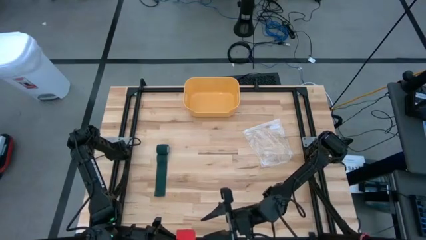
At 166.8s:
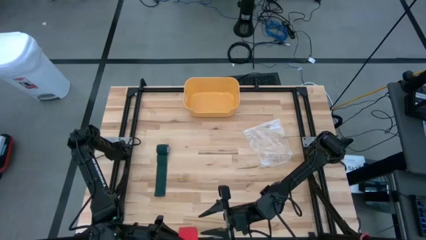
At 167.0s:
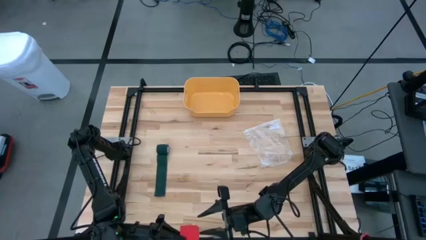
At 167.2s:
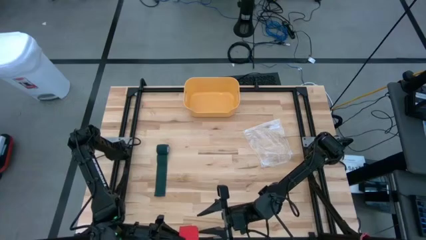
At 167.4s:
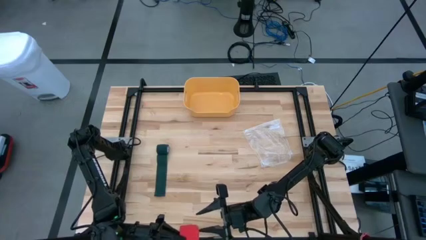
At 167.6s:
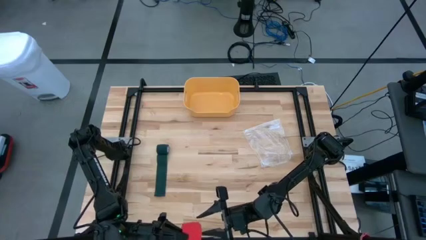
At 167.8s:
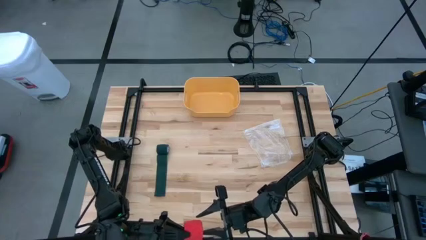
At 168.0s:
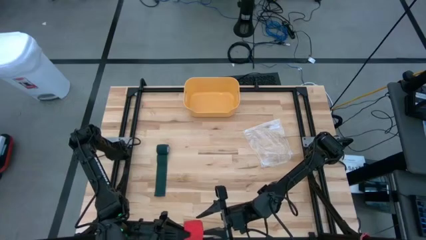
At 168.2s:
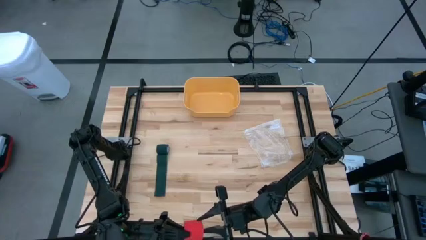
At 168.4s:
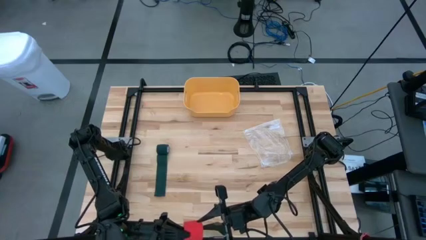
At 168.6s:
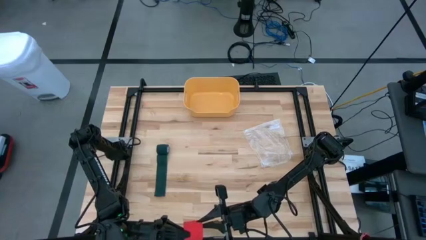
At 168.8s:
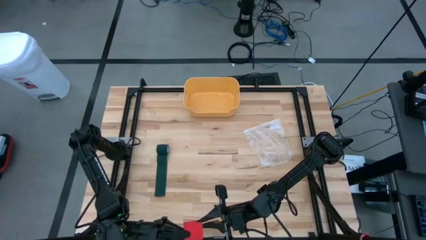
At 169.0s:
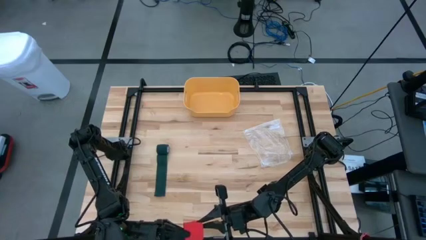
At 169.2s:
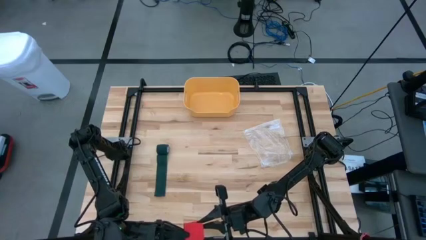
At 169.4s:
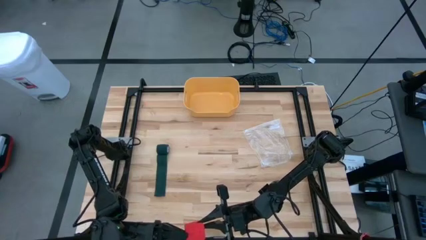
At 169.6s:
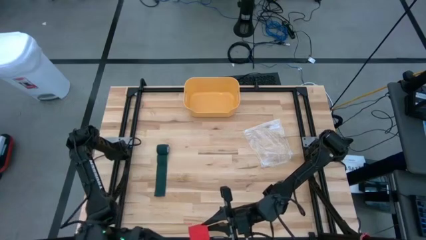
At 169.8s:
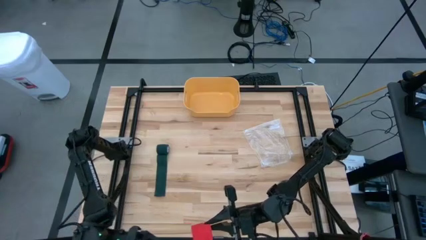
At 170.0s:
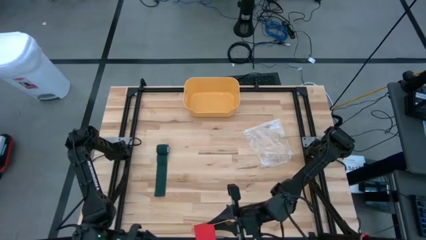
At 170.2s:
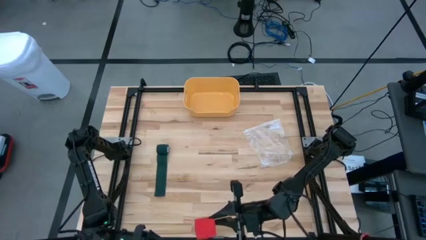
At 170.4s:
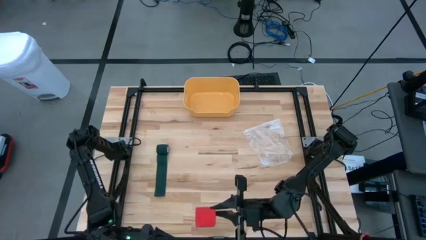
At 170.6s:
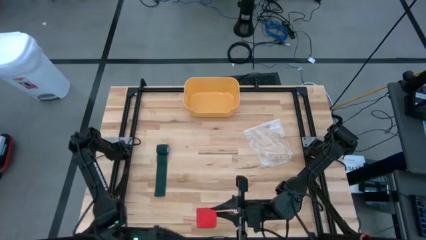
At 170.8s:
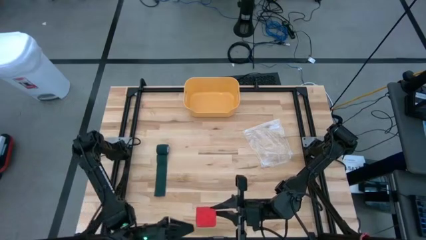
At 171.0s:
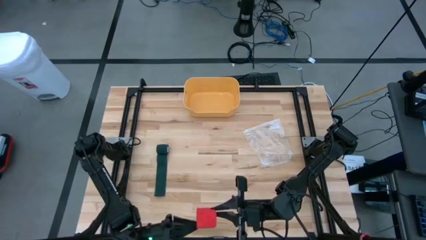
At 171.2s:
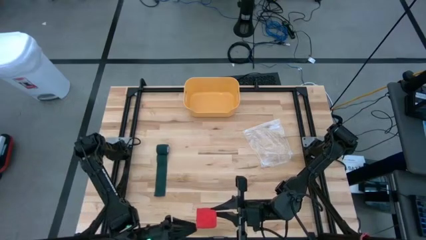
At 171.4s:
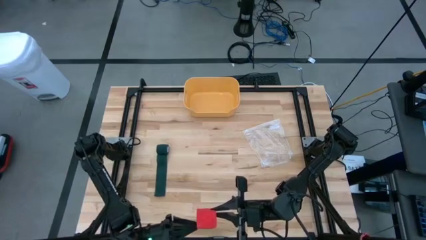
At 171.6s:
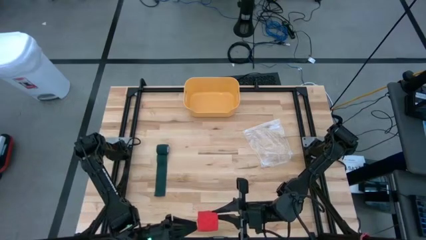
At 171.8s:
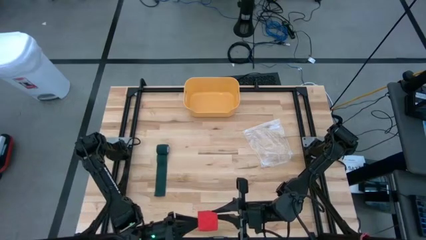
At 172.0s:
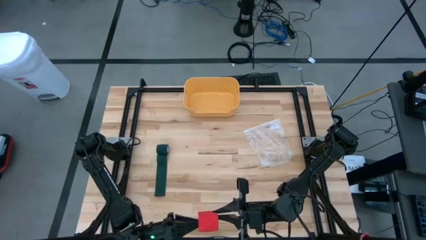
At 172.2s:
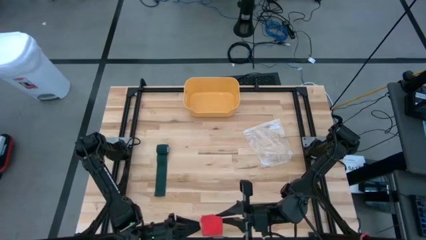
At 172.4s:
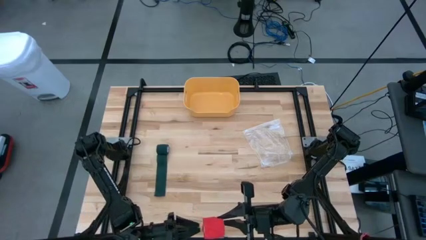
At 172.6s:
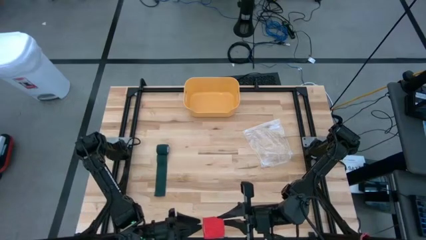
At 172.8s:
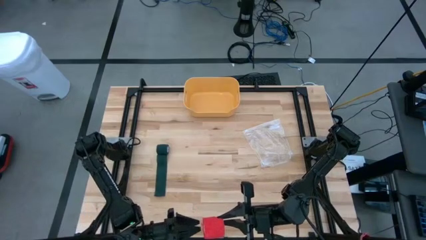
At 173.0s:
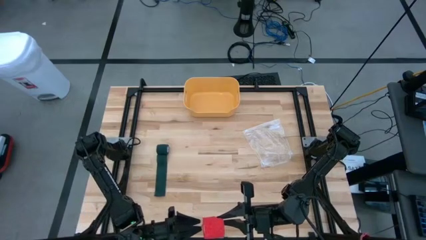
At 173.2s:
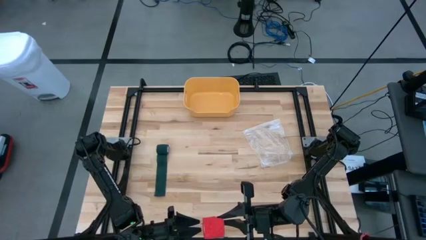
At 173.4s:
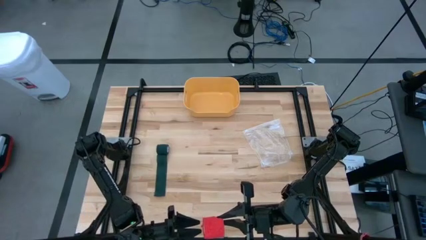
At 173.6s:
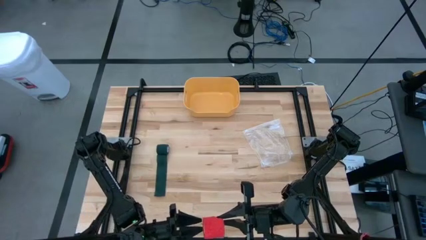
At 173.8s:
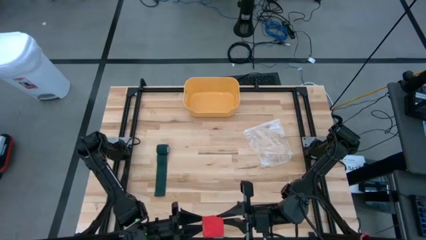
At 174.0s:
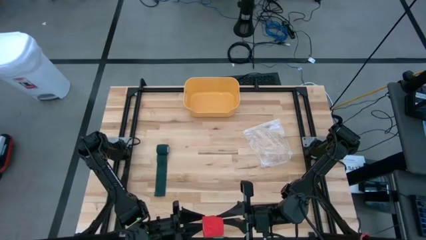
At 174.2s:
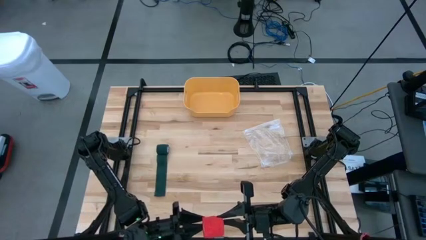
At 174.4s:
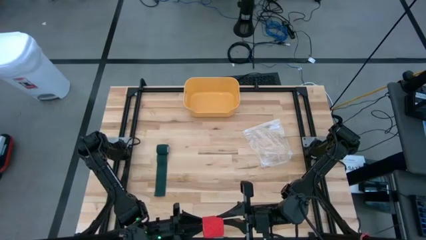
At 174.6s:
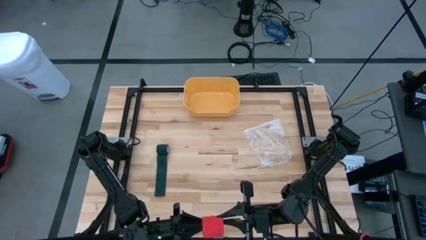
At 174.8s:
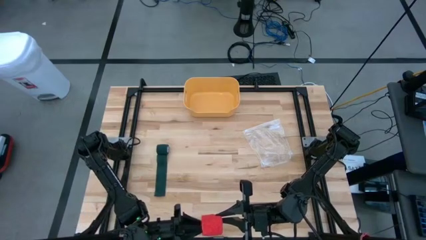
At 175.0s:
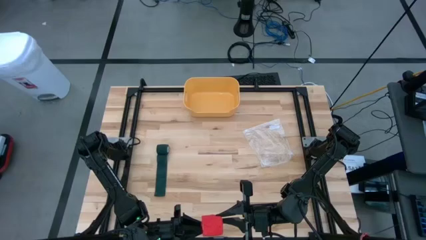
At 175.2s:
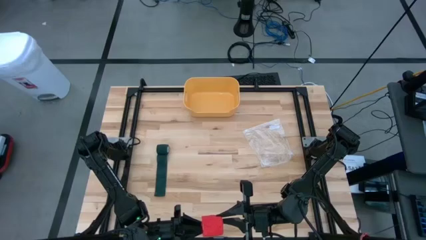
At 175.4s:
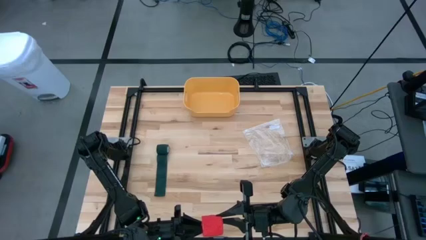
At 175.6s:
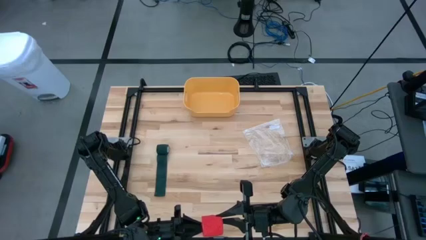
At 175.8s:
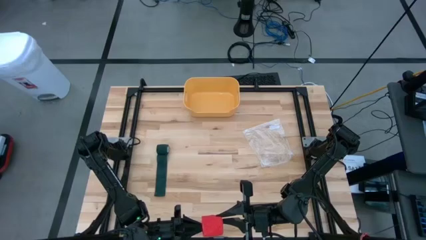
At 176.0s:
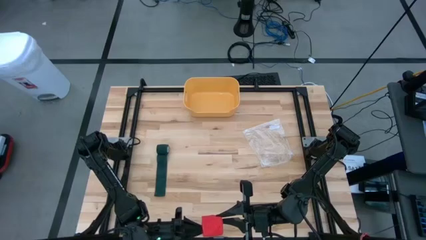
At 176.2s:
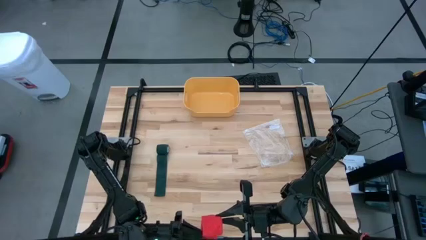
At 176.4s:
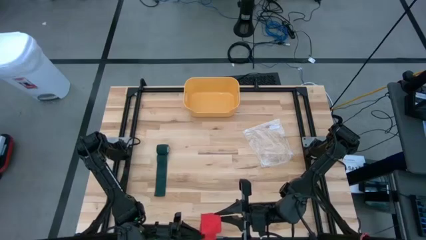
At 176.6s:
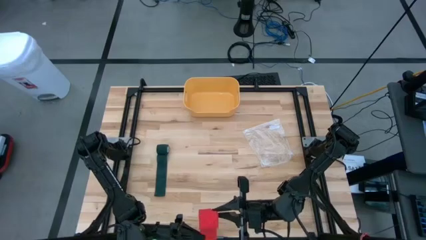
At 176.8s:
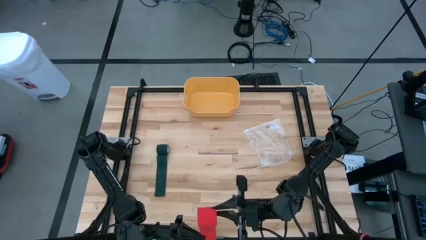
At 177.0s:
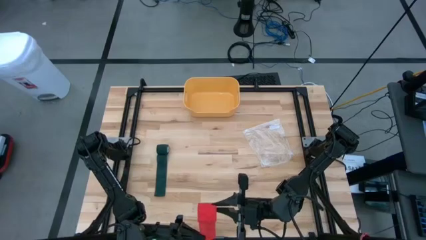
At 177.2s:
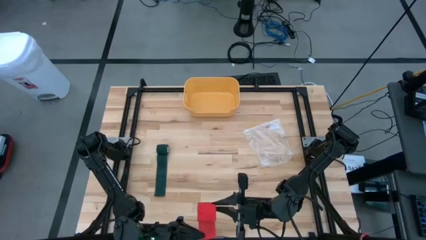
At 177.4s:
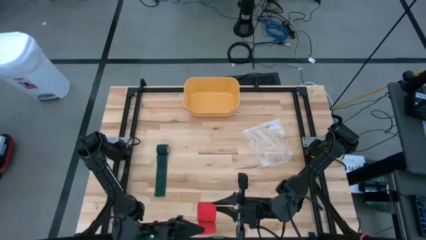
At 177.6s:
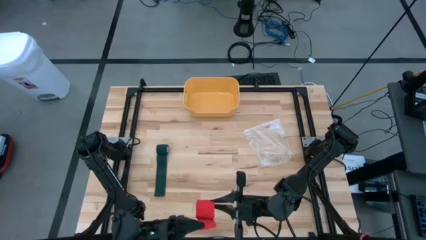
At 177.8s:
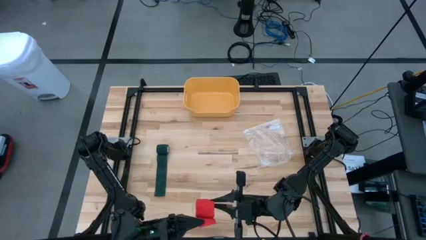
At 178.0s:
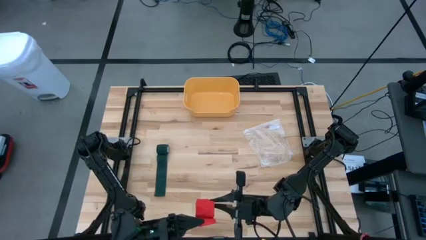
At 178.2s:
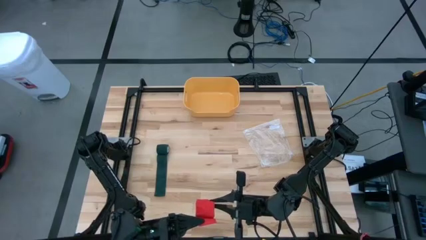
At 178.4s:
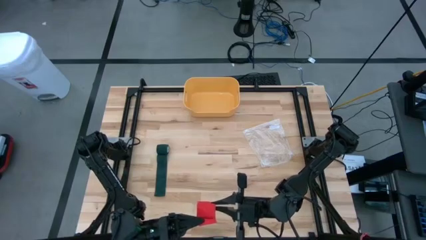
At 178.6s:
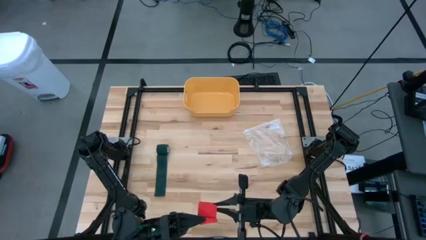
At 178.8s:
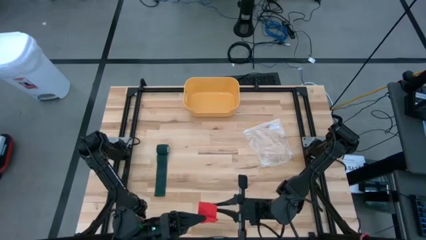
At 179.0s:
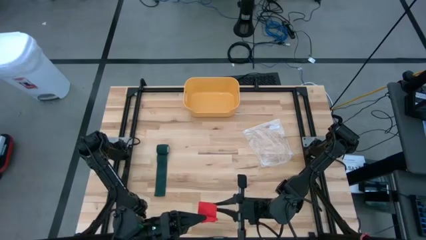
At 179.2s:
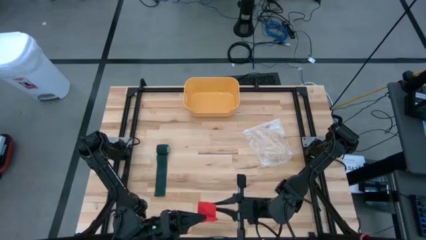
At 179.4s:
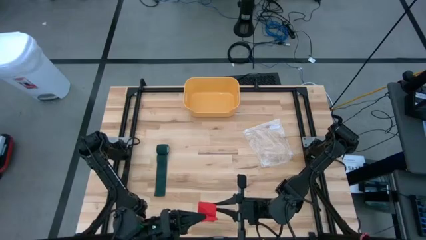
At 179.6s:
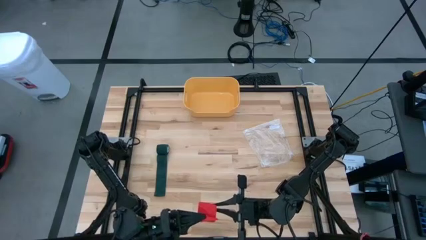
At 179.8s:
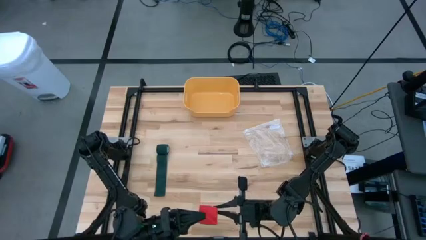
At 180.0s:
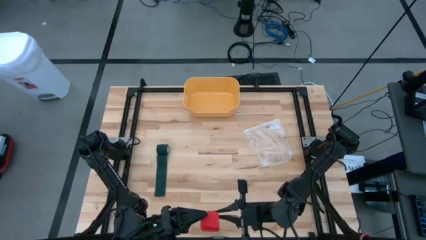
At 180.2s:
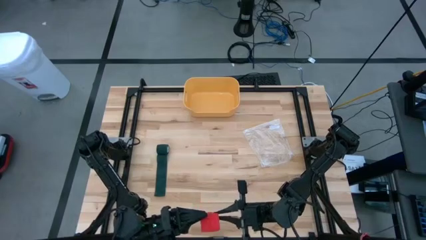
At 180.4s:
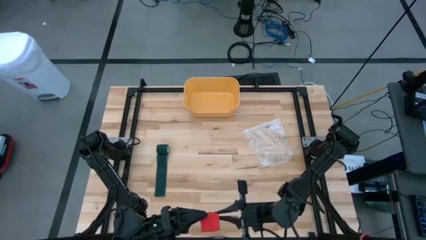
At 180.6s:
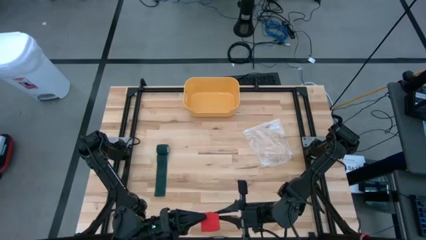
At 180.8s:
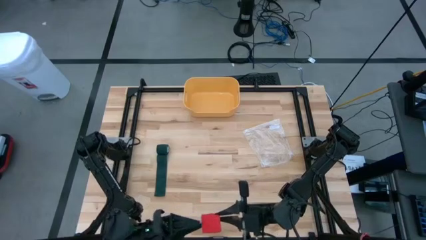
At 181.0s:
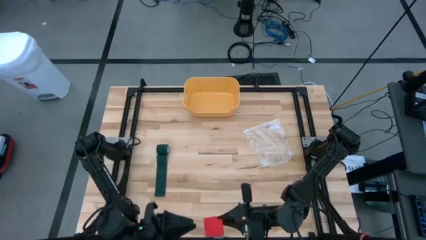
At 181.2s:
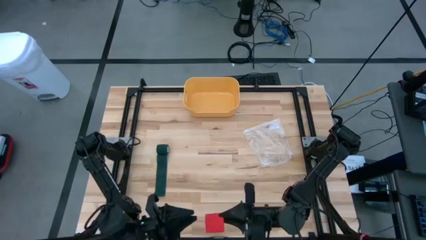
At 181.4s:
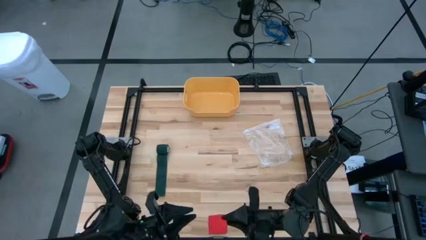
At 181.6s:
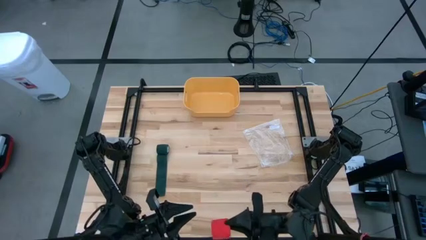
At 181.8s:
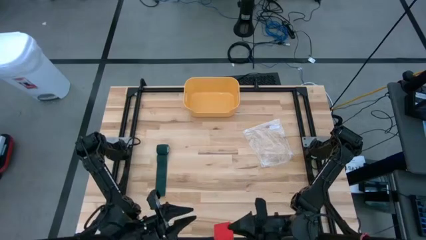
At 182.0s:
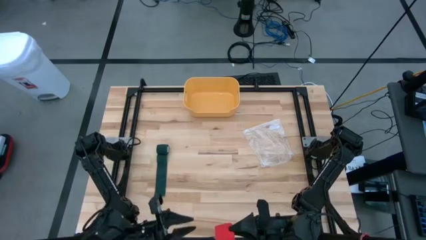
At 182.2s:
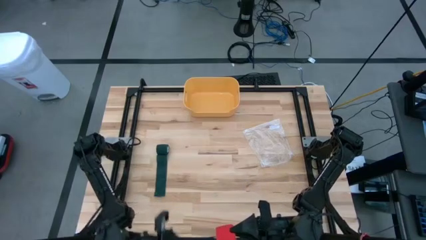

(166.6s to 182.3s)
Task: Roll bandage
Roll the red bandage
